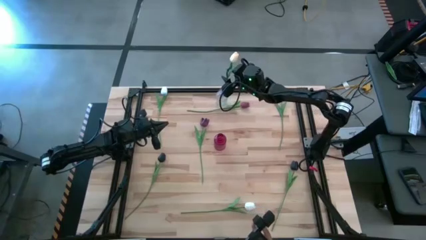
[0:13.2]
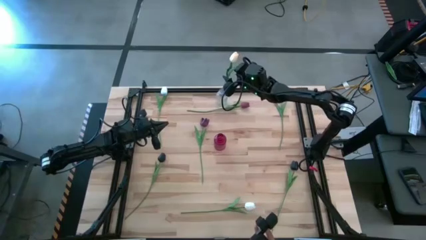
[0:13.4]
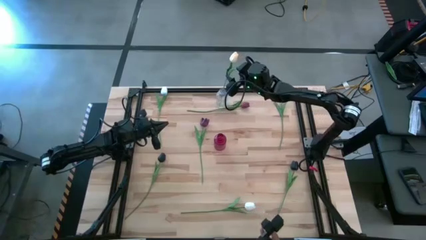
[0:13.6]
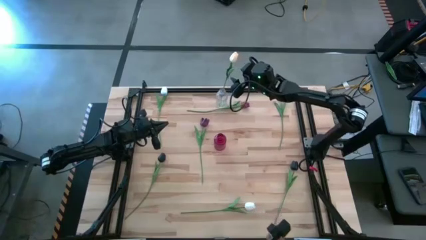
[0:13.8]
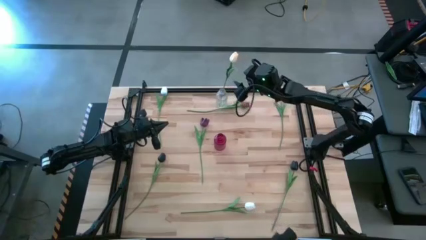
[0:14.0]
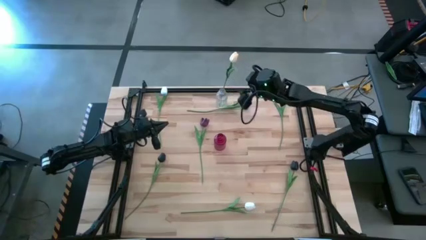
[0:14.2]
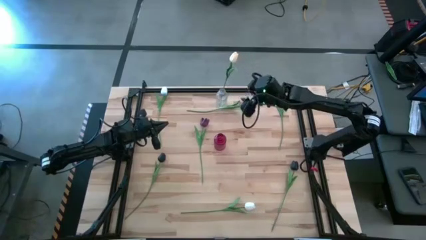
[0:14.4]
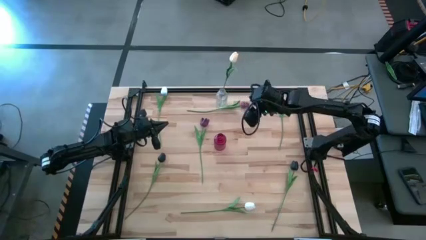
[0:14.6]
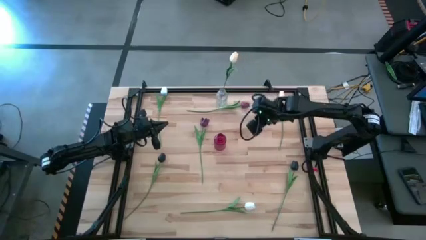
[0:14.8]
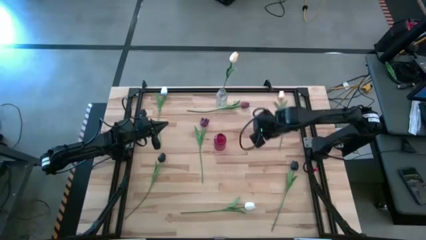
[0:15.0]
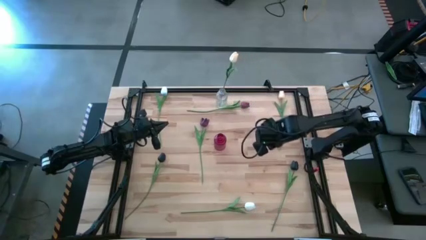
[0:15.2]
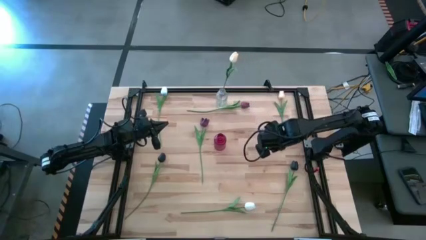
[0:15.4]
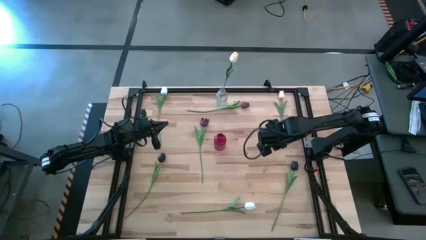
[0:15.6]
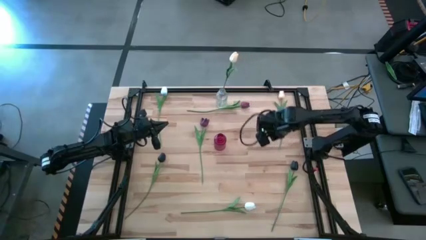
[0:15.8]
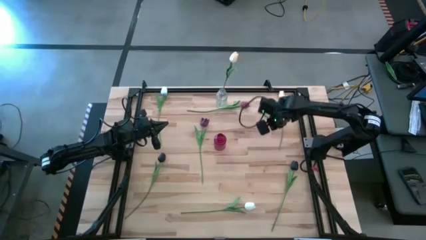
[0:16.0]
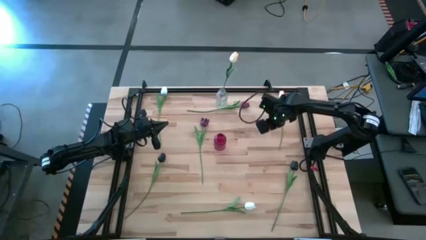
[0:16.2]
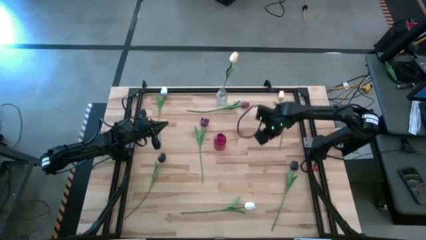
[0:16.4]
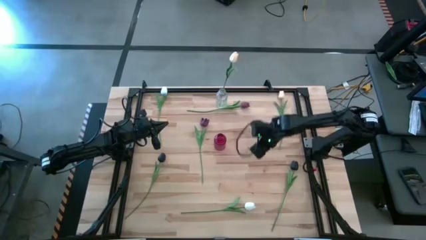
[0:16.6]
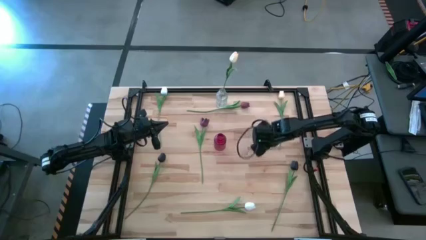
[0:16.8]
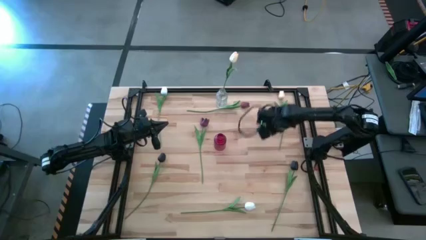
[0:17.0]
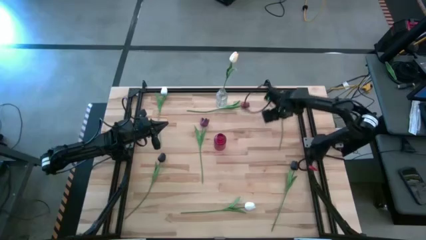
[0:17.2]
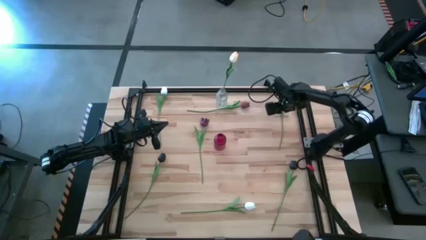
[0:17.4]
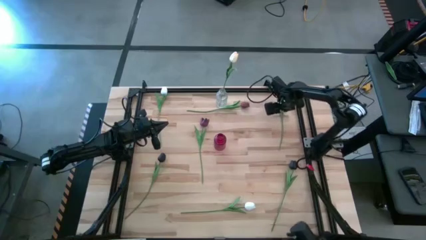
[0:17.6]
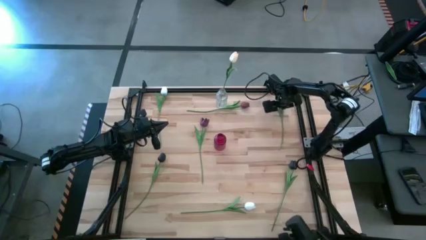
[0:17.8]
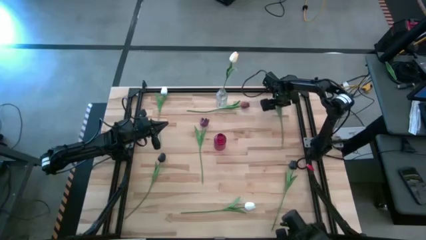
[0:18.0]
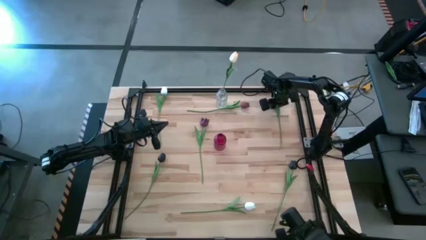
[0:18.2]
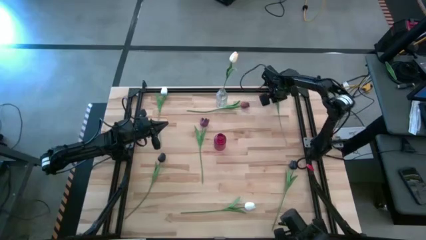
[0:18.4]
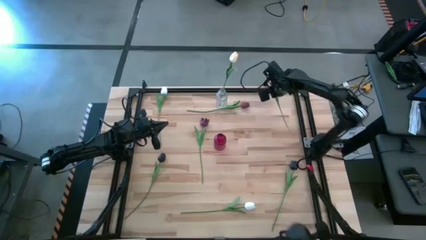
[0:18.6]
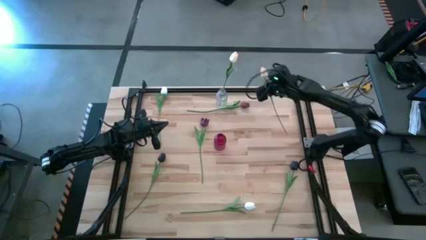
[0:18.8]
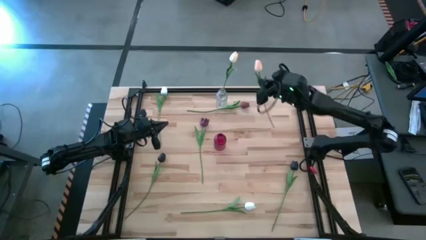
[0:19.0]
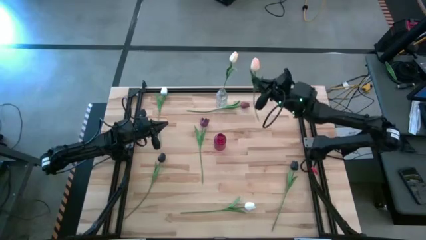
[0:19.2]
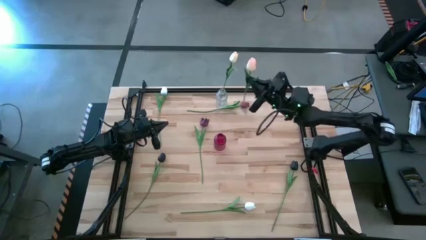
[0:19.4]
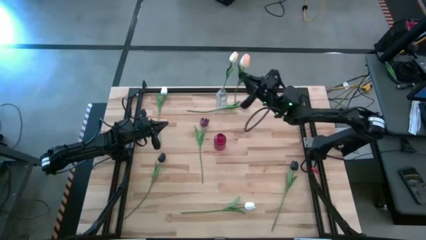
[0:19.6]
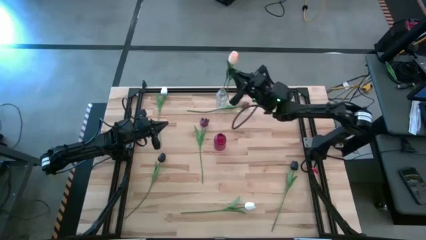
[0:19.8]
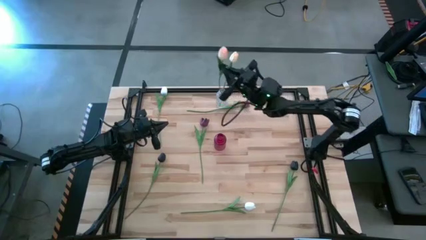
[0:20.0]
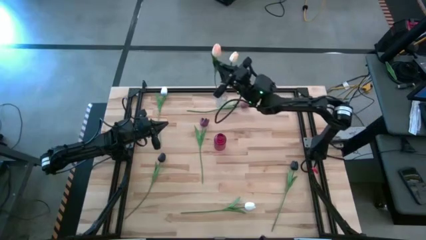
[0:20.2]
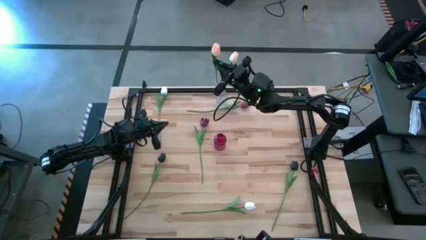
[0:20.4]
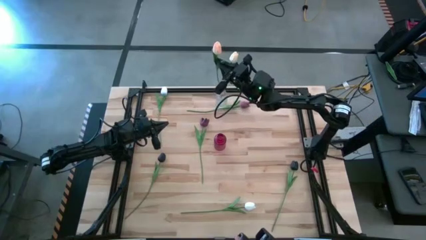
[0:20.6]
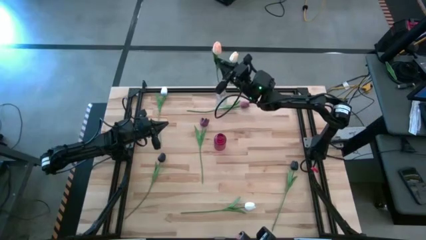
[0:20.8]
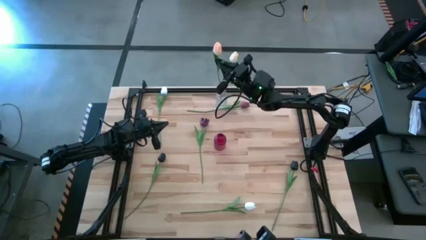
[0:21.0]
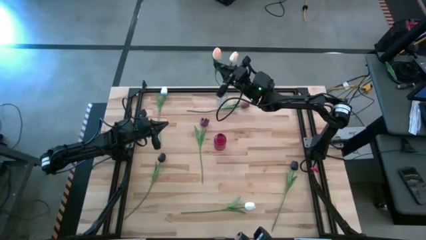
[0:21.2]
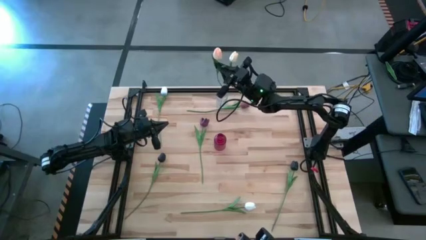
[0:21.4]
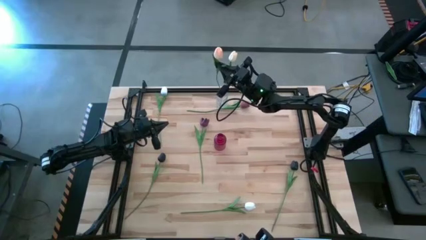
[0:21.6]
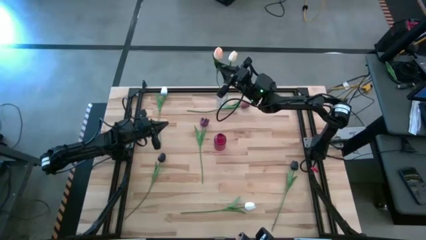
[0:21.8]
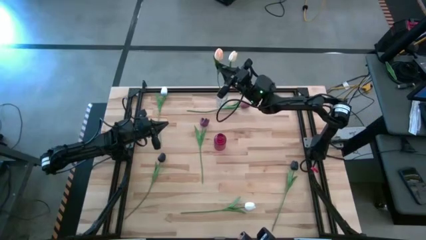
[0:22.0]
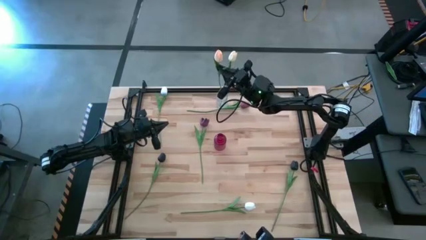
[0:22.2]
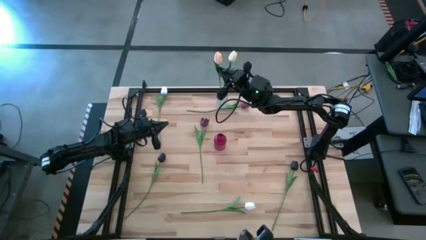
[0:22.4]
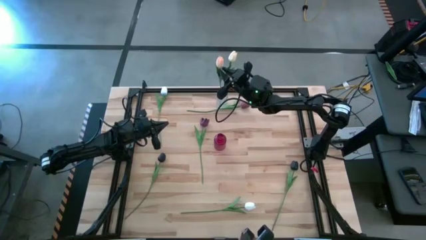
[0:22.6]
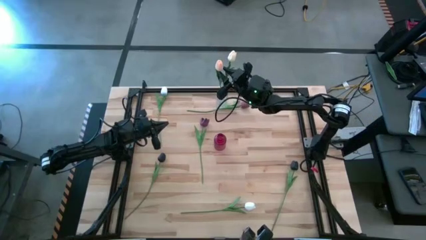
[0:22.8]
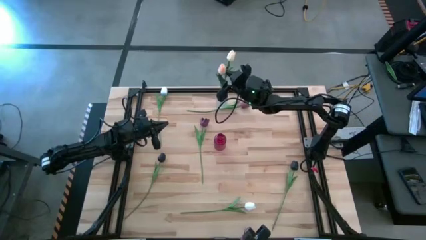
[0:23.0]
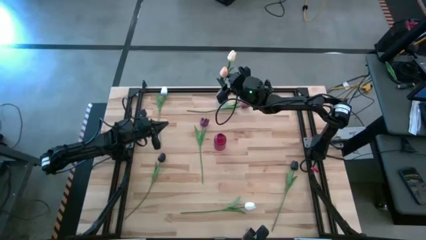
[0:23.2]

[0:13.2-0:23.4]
Task: Sort flowers into vase by color
Put the light pink tulip flower into the transparent vase

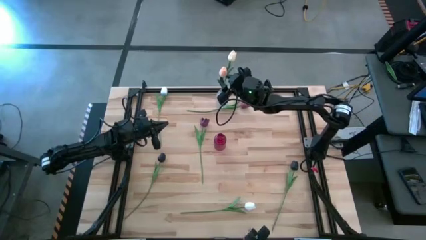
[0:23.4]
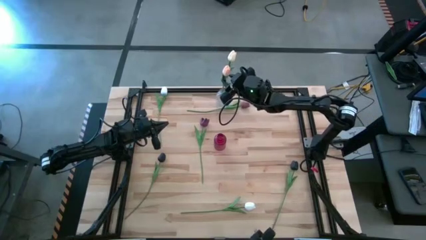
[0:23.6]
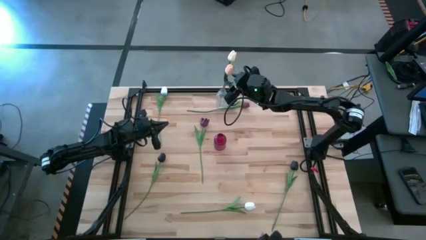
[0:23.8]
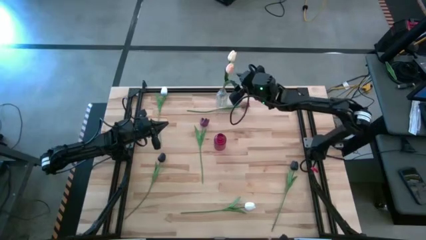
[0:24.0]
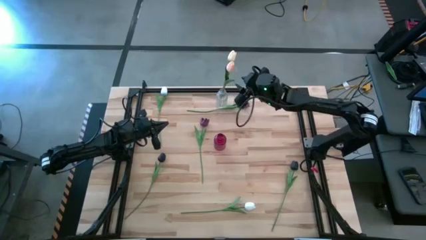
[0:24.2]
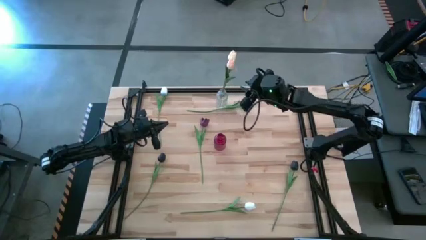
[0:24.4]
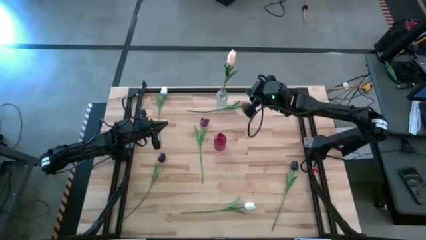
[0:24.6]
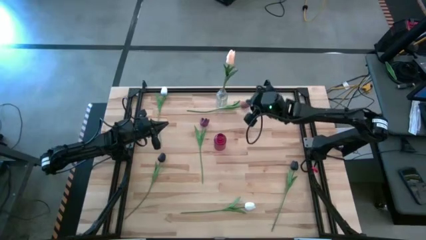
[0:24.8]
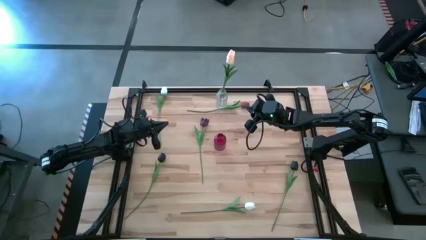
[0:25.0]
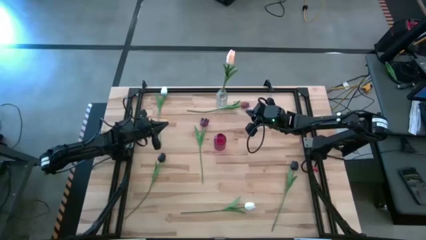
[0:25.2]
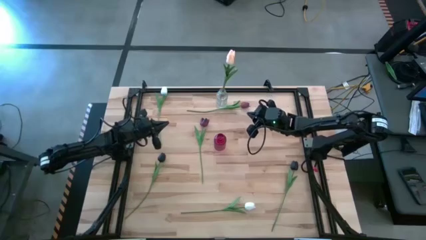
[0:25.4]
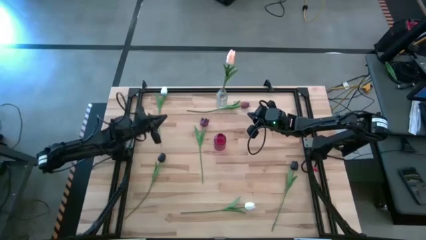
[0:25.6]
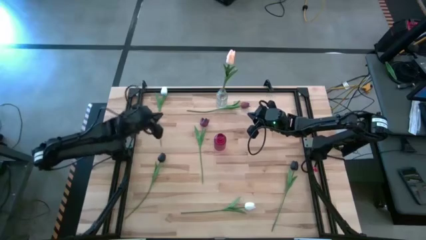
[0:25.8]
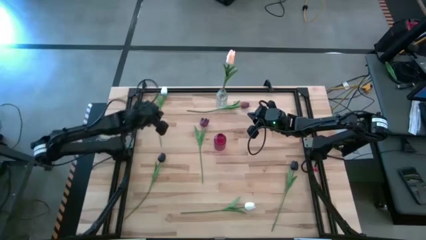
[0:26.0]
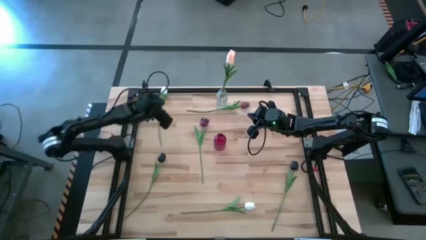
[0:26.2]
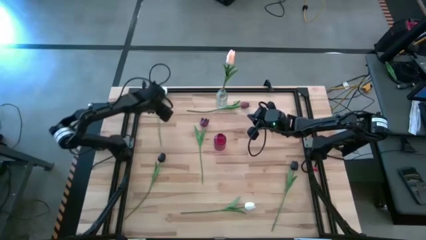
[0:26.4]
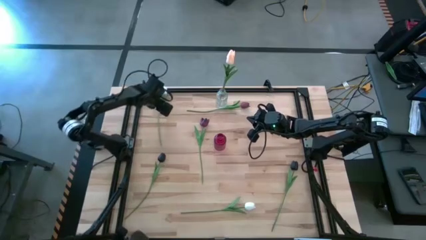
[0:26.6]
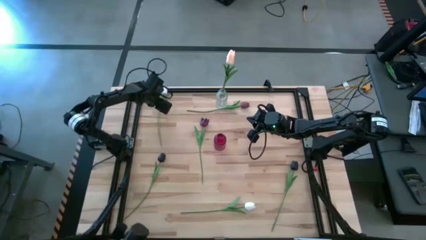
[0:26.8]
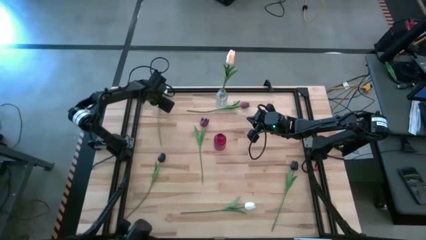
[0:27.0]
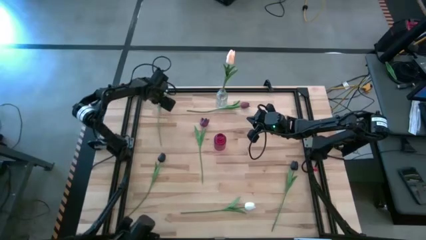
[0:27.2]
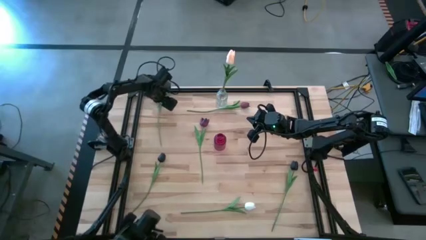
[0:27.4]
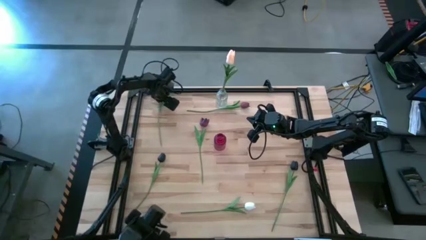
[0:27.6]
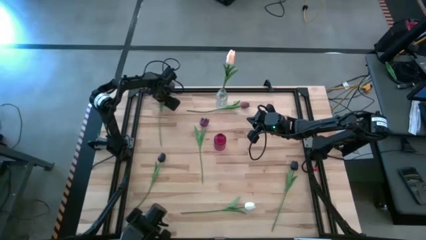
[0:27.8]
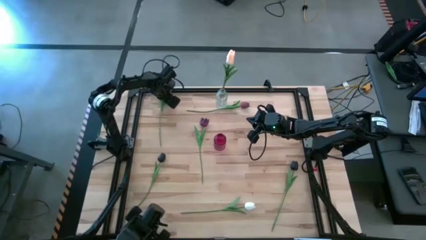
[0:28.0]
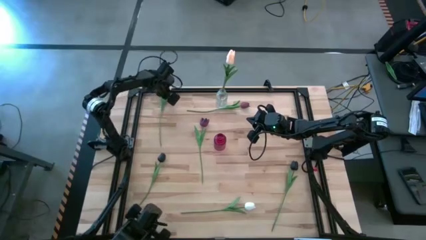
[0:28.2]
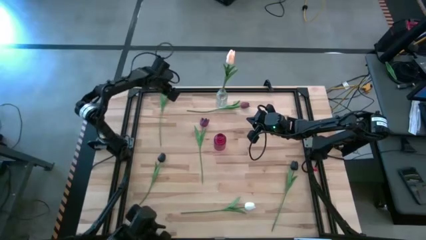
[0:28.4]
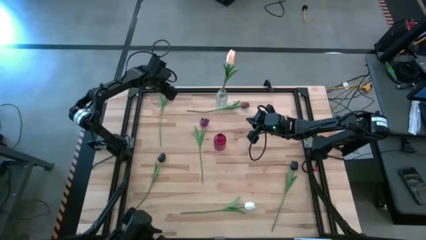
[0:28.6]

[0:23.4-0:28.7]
Put the top white flower into the transparent vase
